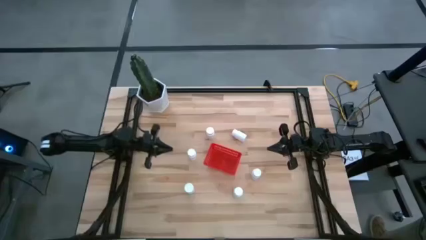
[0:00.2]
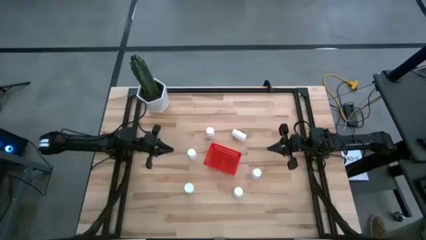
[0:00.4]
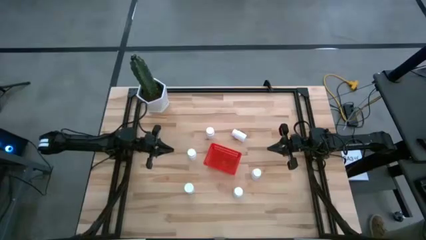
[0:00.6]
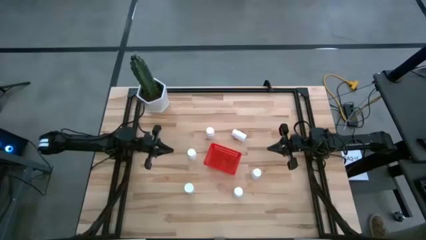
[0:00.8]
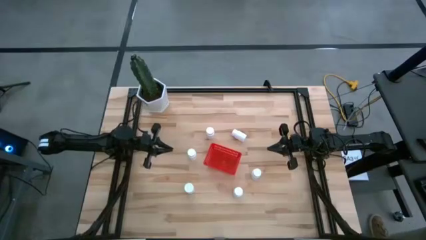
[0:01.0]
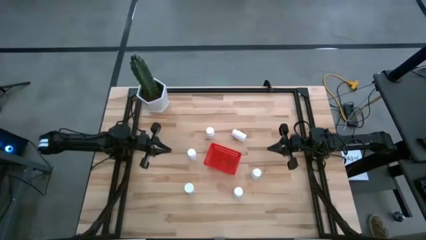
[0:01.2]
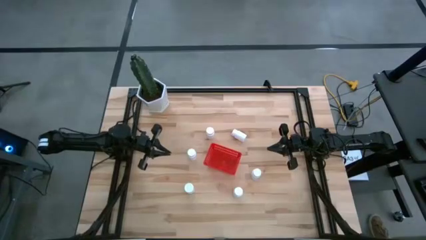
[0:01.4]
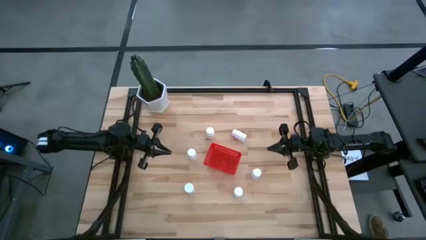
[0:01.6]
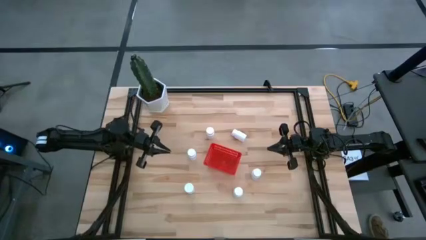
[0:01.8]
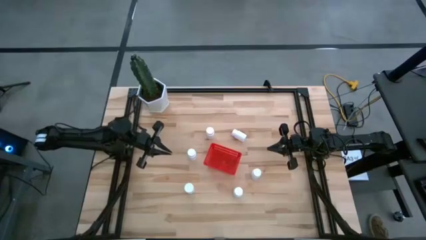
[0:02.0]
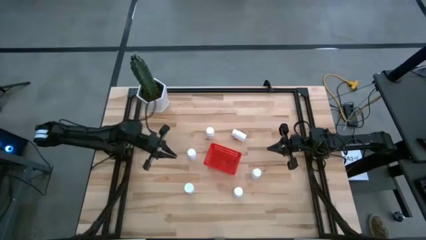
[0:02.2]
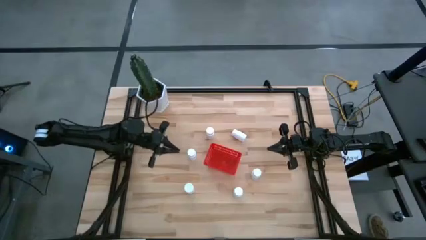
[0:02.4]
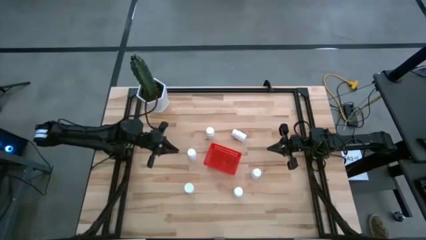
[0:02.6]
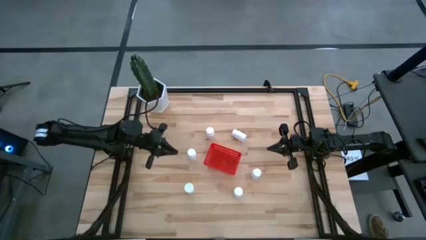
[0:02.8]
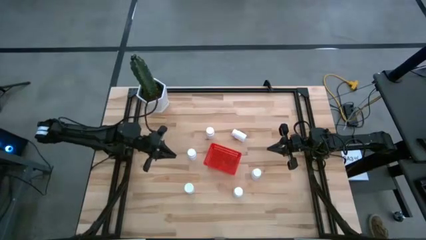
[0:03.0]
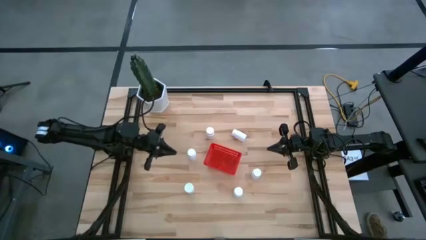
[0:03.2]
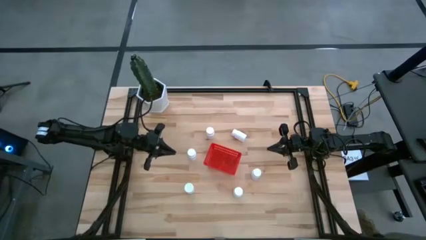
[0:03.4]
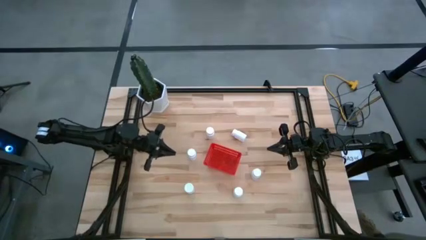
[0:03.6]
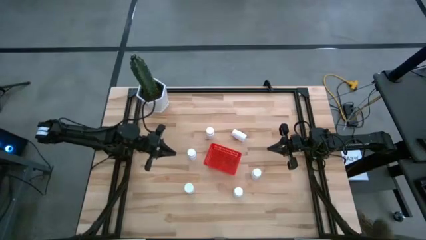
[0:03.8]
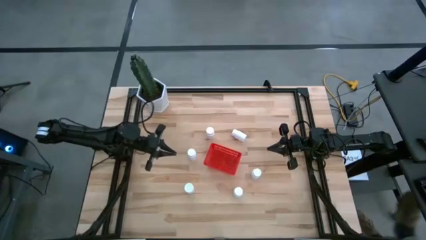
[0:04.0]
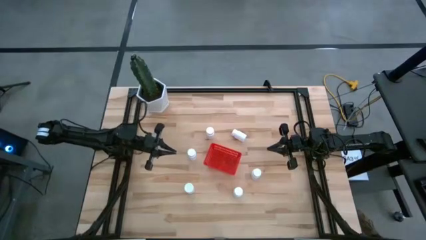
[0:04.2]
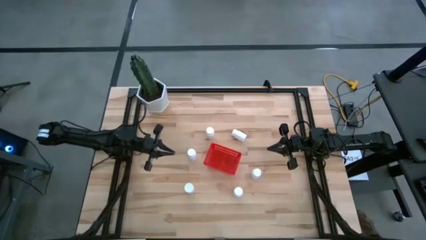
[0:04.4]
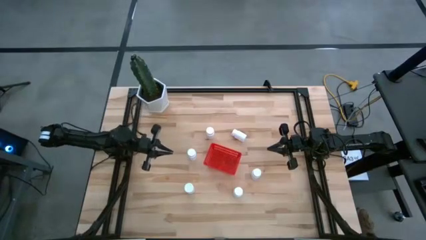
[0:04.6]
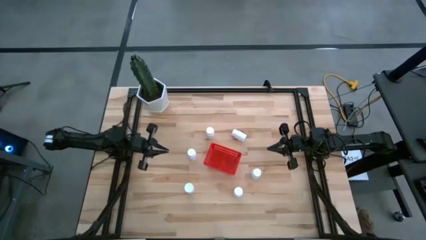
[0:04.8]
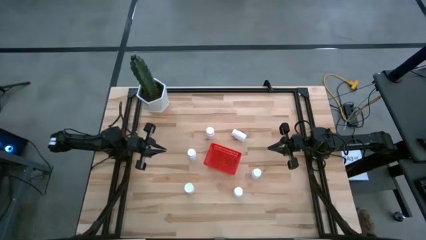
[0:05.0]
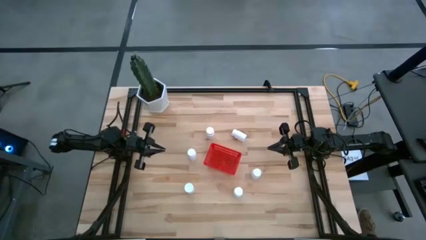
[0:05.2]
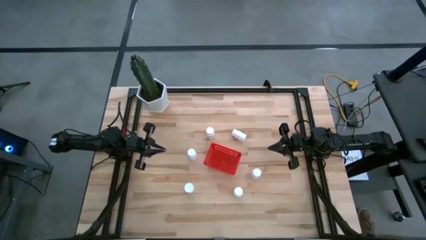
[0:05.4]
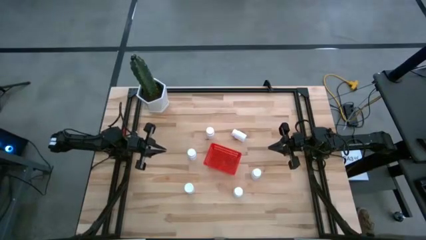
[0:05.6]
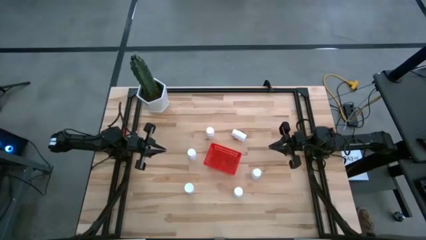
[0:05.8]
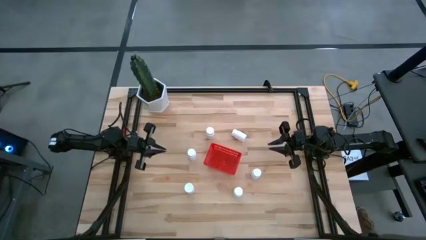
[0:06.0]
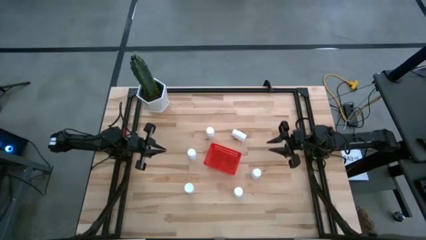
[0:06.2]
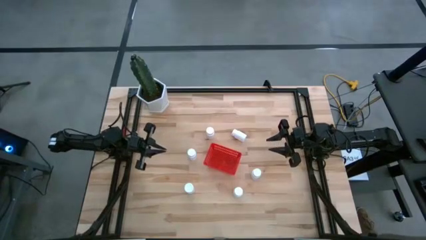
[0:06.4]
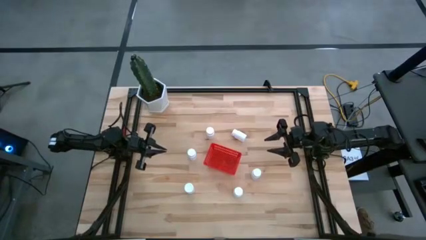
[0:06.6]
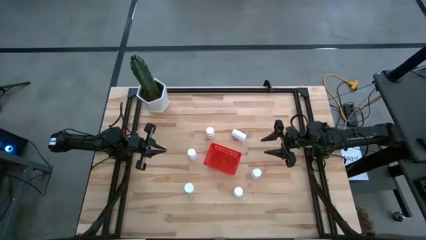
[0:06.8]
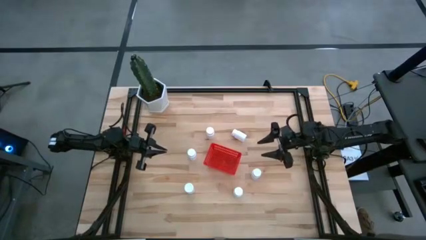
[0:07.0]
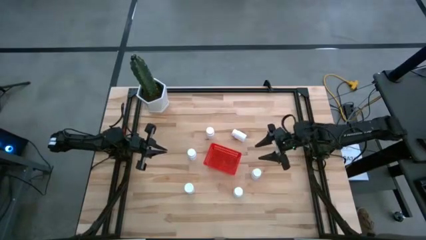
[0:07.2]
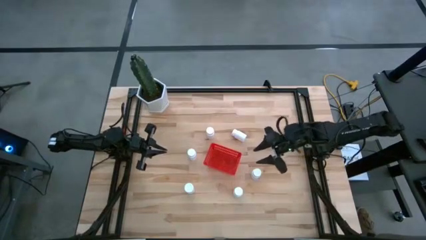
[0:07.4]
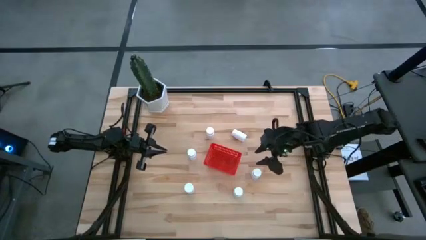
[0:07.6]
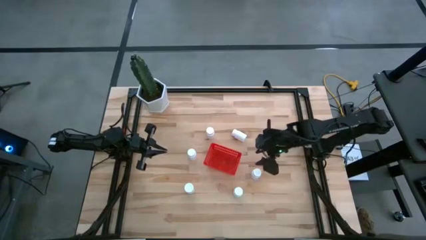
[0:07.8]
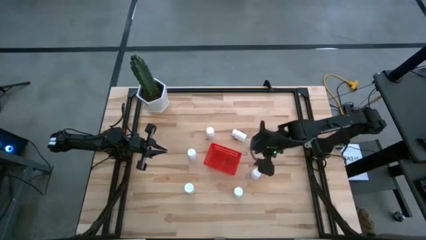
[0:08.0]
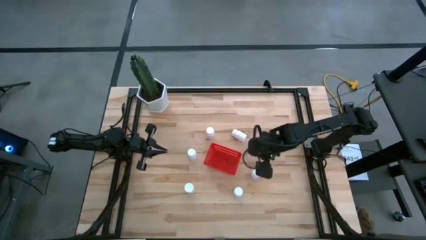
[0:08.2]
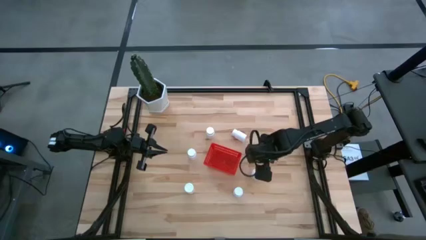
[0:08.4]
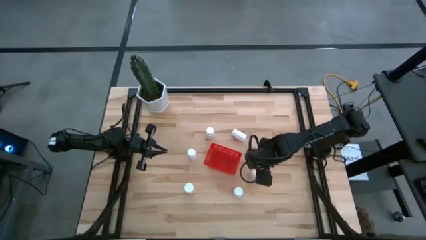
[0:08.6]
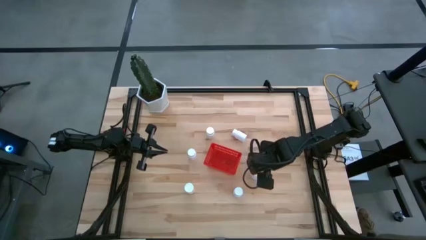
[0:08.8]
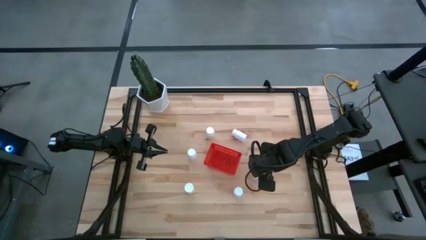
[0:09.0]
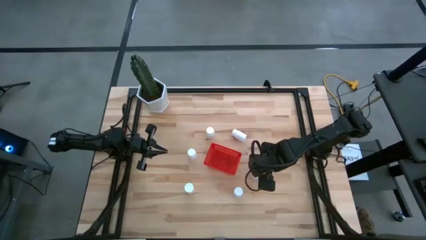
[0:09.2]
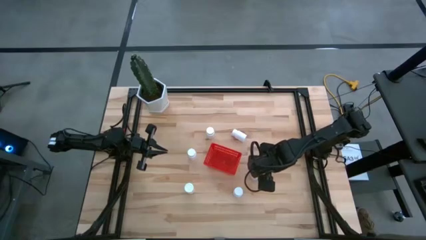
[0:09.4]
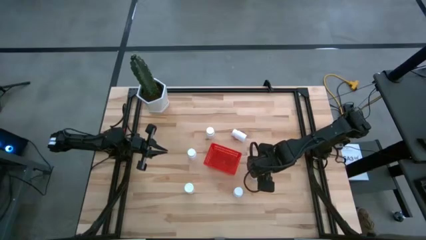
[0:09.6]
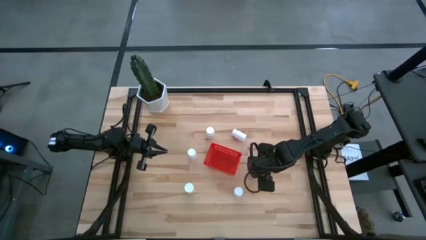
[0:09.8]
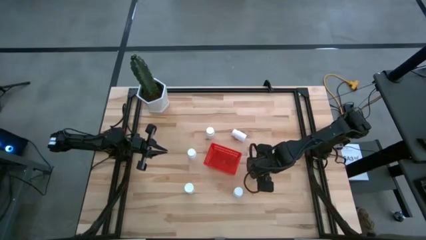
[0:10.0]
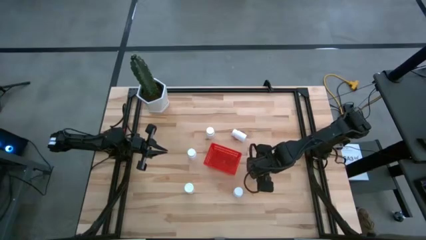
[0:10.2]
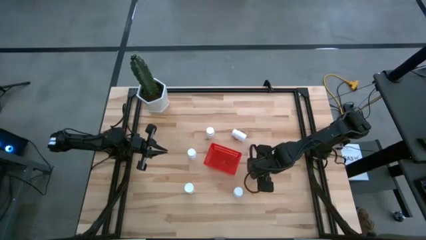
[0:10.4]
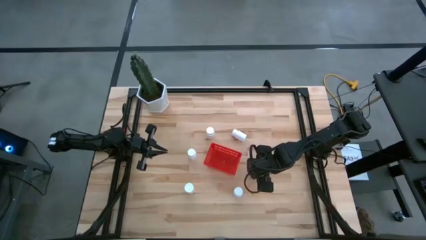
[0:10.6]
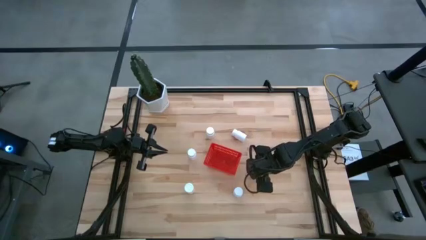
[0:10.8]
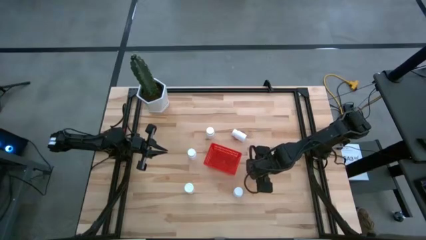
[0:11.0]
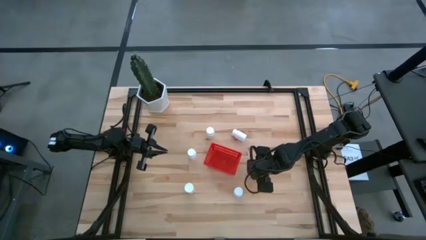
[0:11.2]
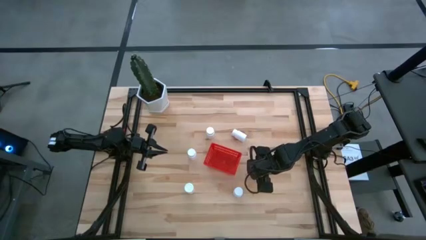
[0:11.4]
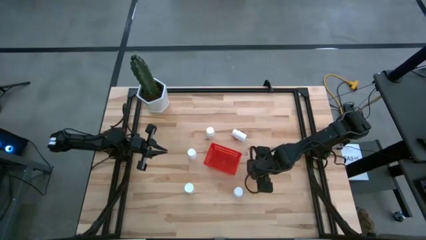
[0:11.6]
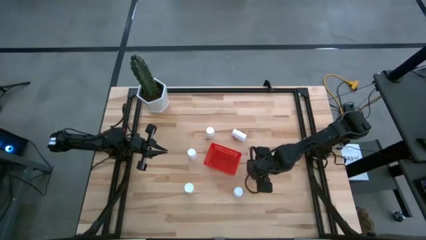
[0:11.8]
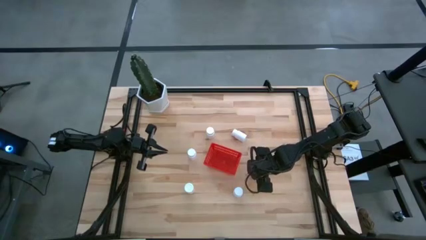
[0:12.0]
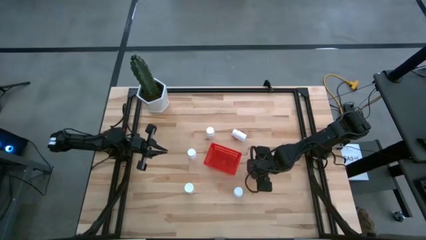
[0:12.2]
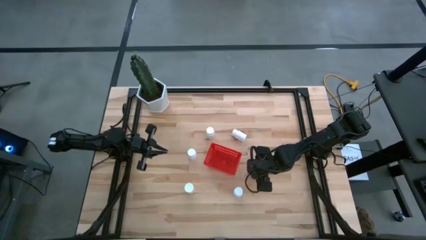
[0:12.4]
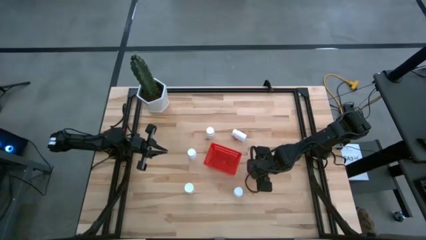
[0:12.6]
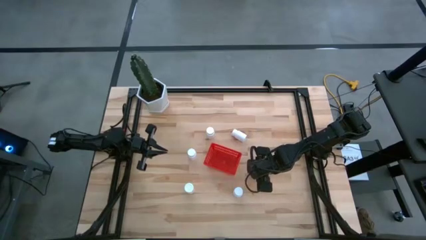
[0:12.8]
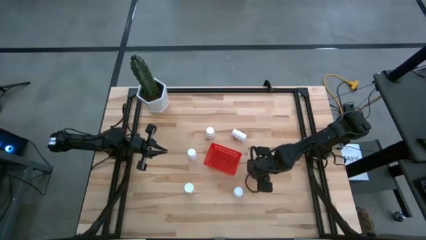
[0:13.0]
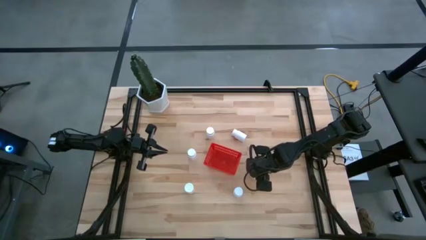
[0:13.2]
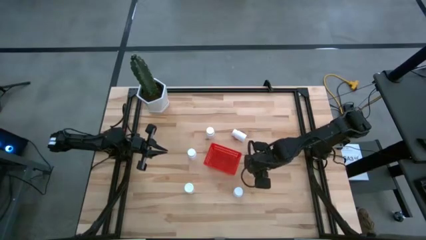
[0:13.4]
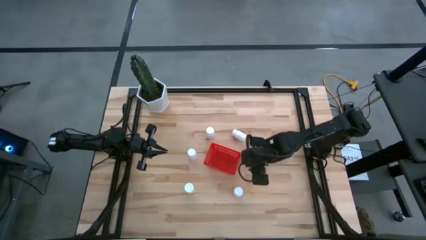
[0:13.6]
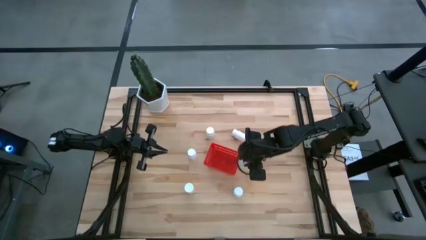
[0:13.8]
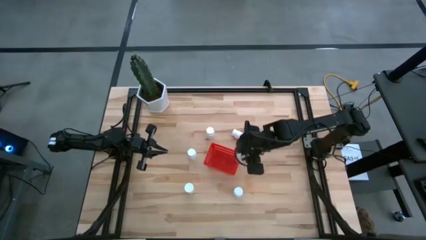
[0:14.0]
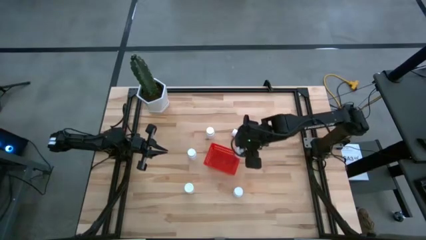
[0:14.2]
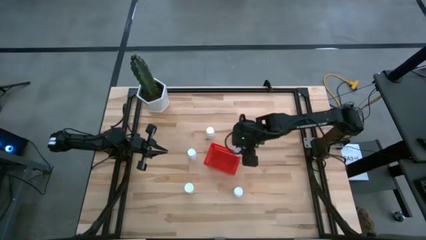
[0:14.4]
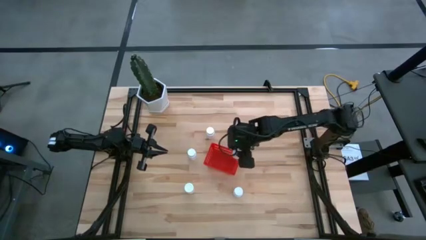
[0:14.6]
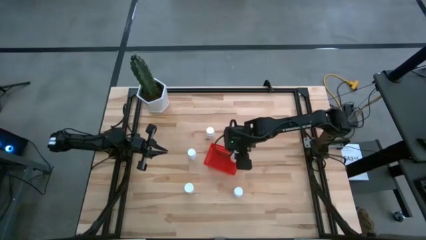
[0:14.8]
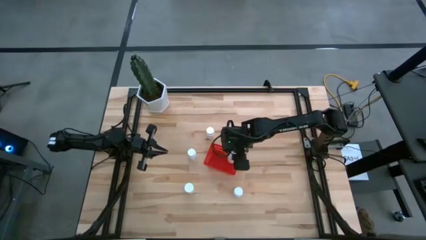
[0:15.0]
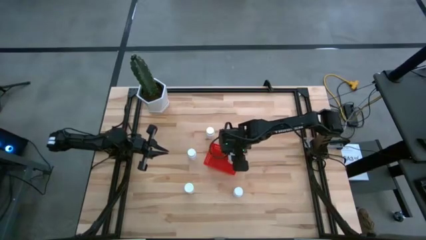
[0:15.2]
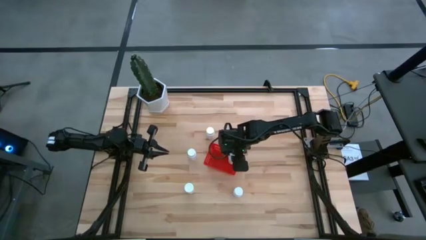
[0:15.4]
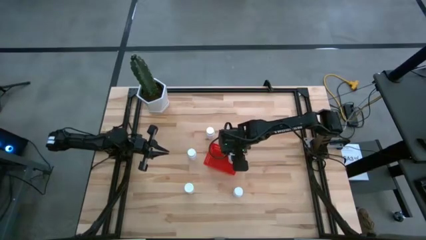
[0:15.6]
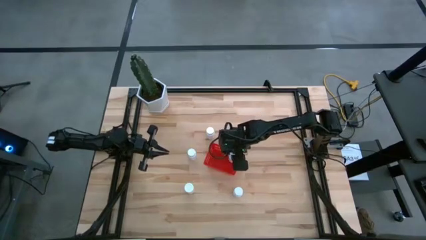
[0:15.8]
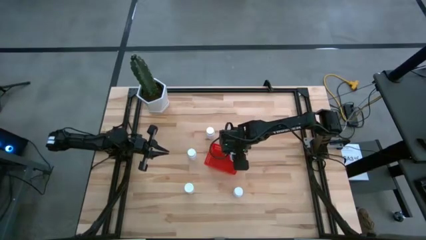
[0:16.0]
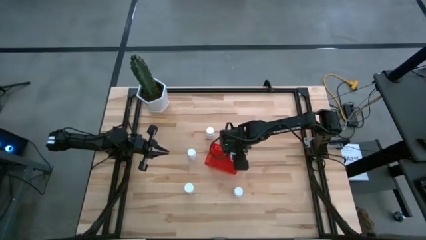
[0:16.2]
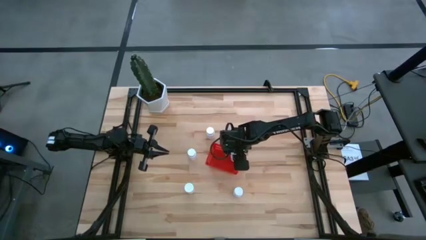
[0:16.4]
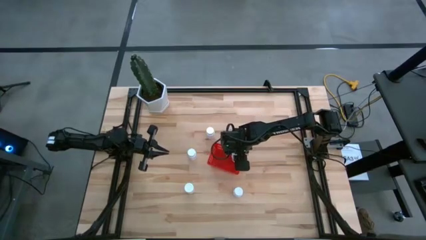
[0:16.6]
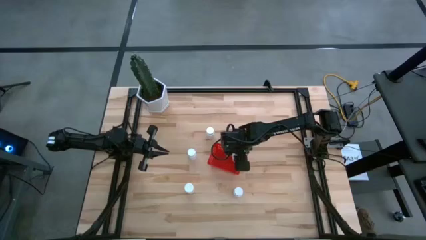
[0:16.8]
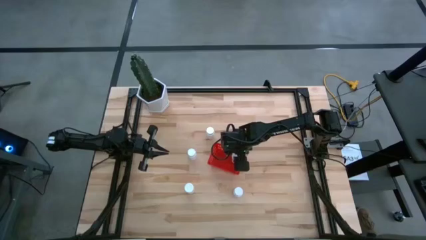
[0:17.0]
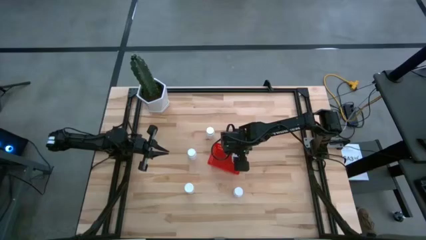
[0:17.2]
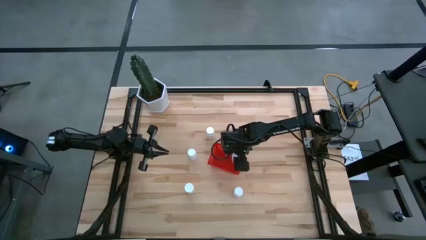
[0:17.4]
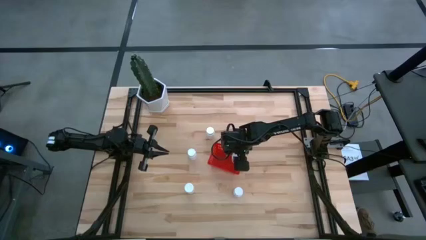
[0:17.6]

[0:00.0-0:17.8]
Task: Pick and place pill bottles into a basket
Put the white pill bottle into the red bin
